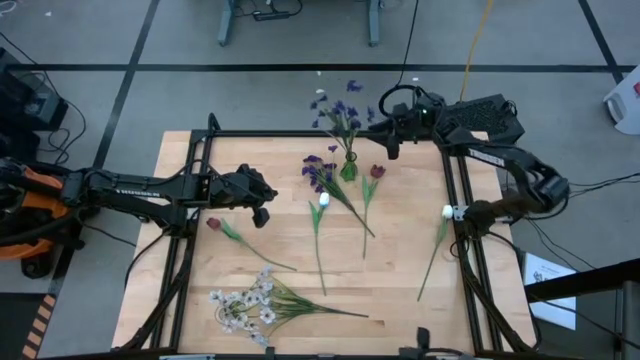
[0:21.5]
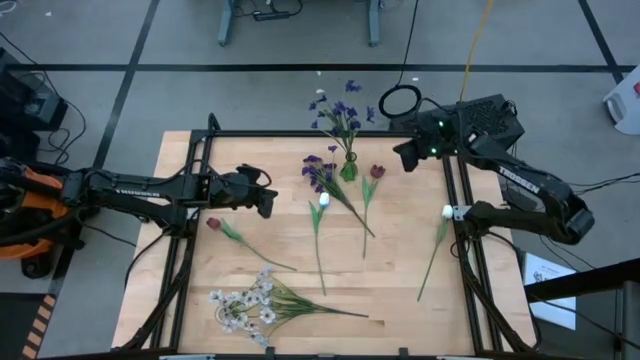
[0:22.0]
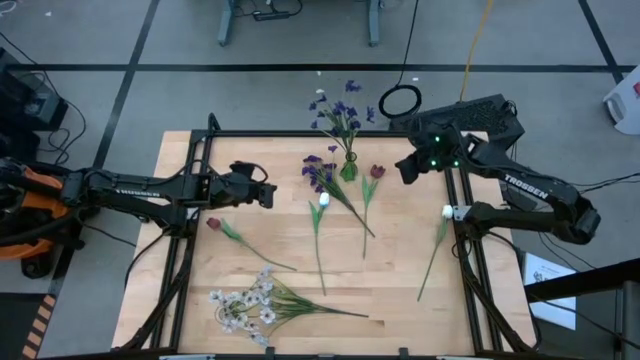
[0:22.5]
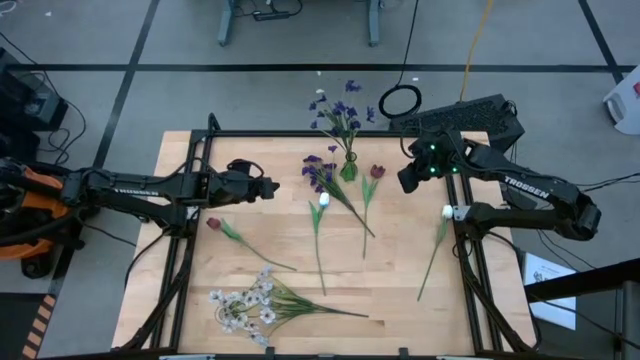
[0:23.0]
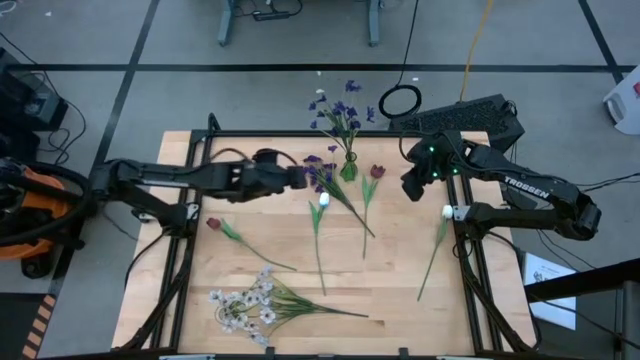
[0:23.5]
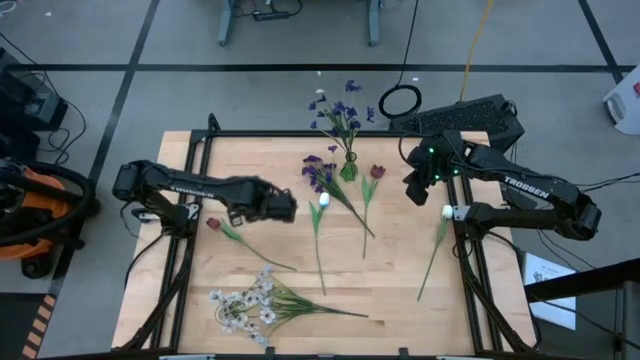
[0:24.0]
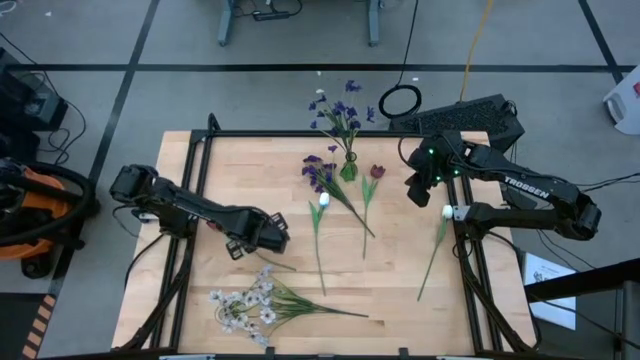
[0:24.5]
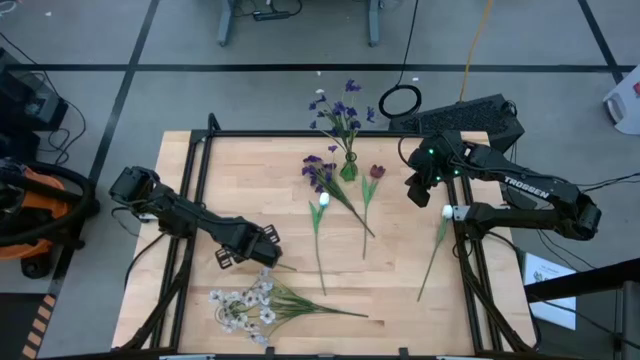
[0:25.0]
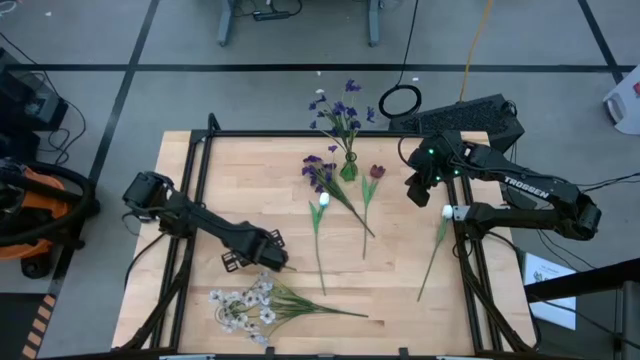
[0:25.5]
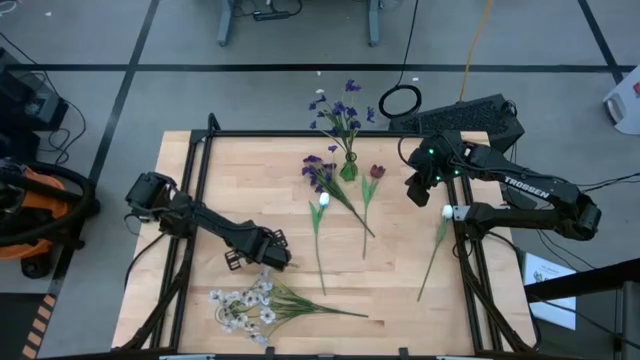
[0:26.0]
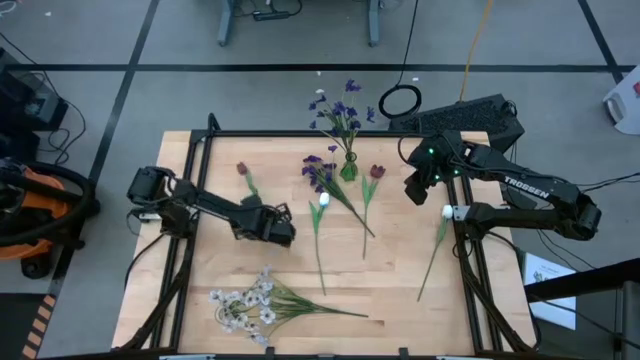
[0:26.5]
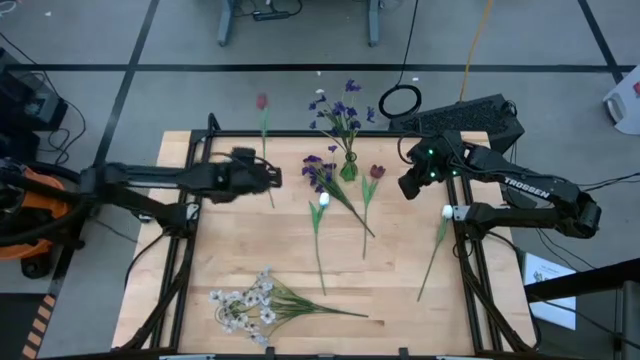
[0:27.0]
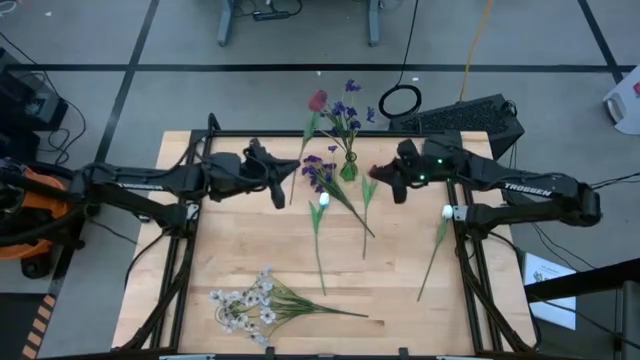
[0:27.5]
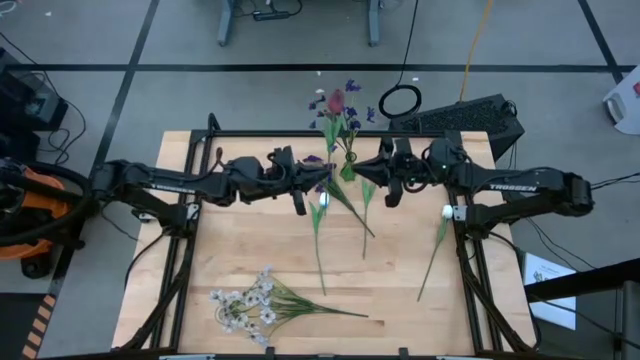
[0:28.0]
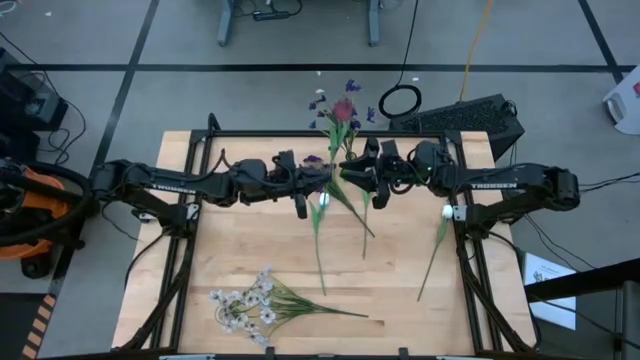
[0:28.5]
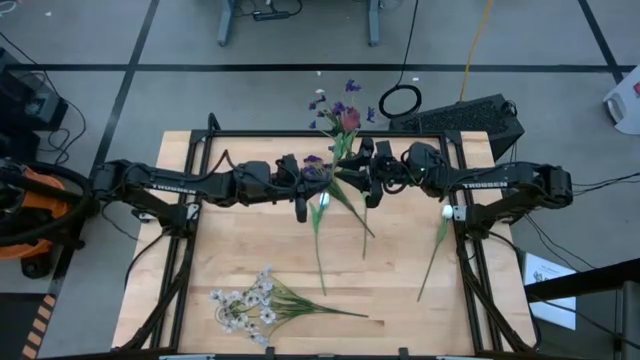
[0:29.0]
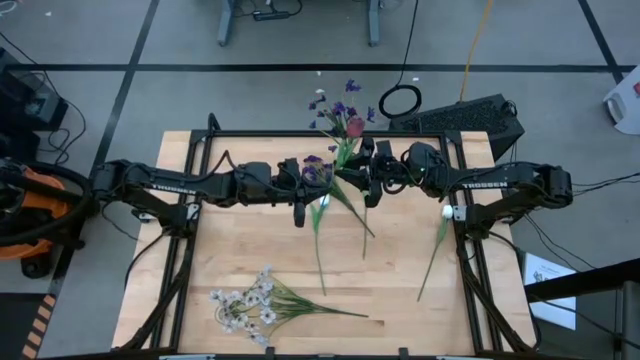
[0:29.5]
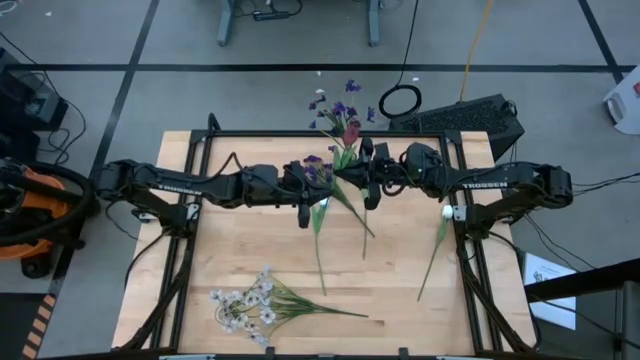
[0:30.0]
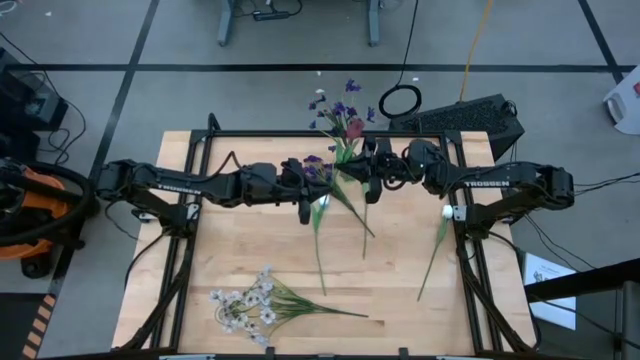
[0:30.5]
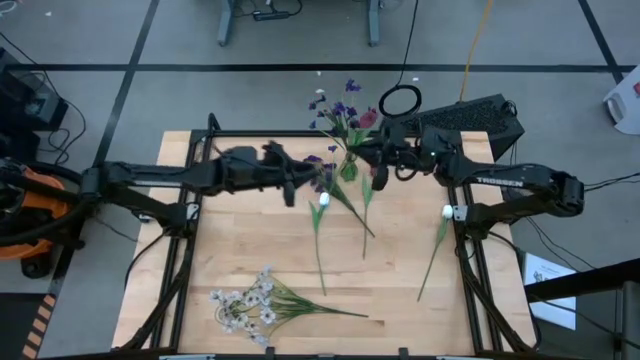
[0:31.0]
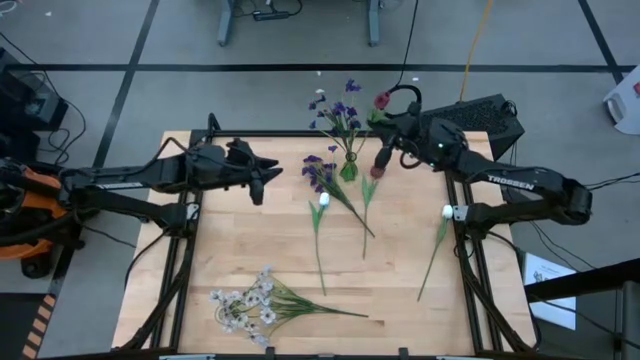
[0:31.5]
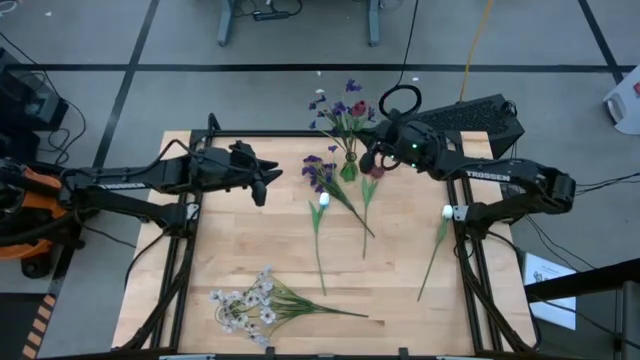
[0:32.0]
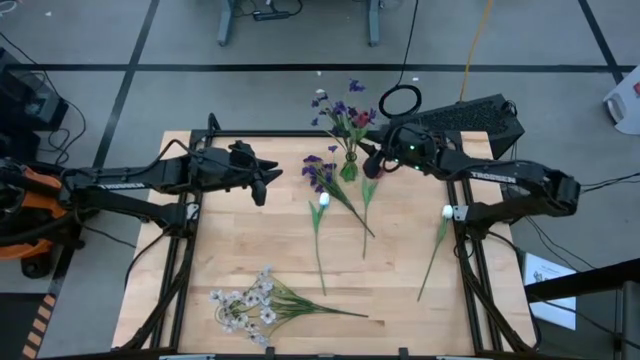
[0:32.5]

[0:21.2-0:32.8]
Task: Sort flowers into vase by color
Put the left red tulip into the green flower vase

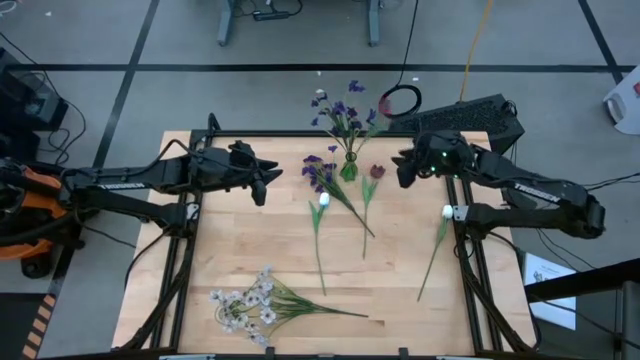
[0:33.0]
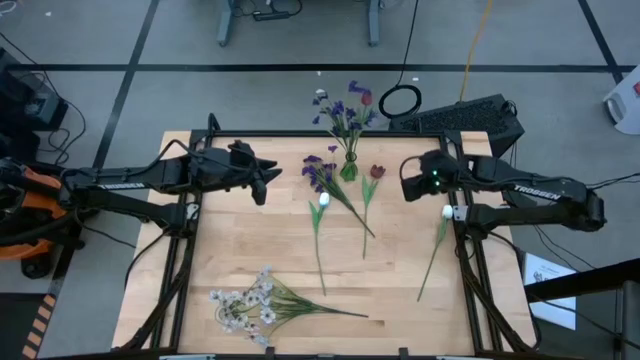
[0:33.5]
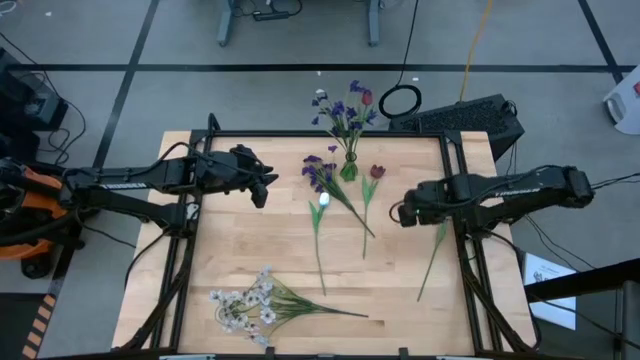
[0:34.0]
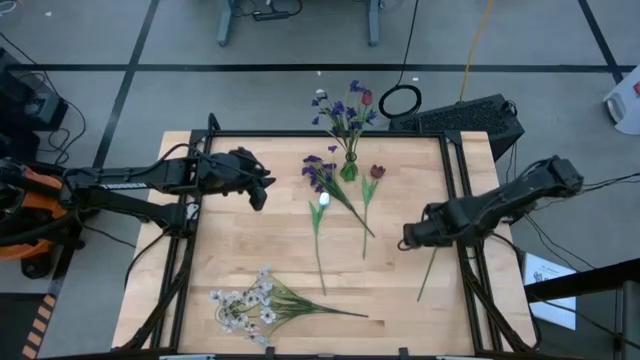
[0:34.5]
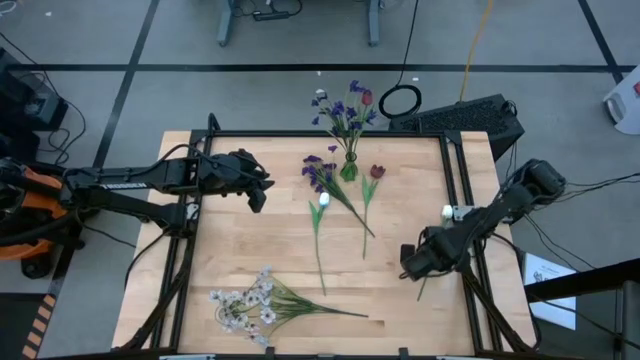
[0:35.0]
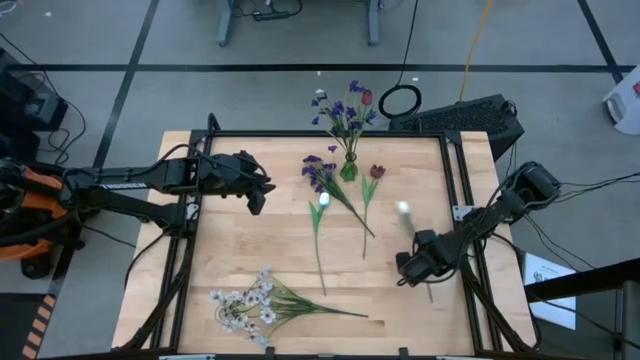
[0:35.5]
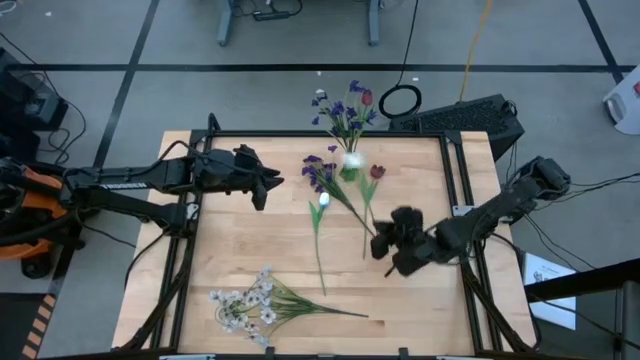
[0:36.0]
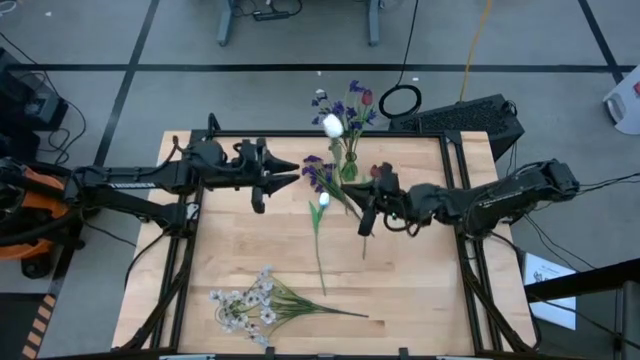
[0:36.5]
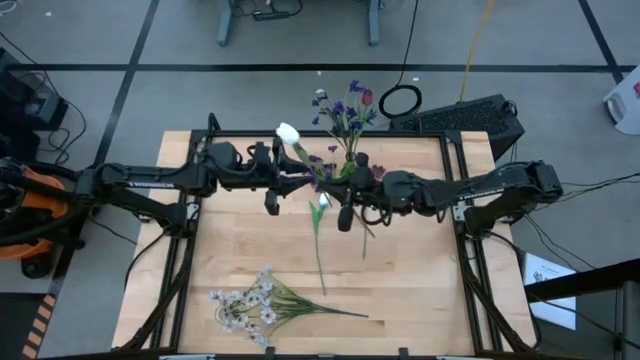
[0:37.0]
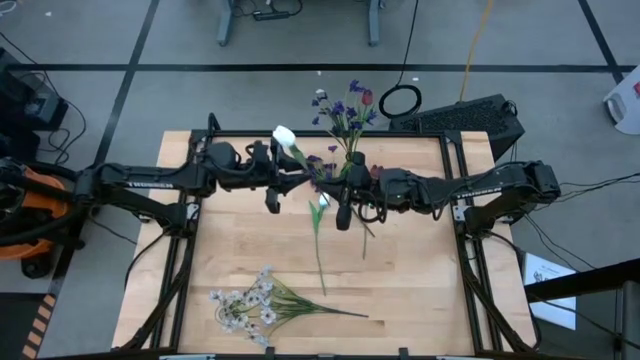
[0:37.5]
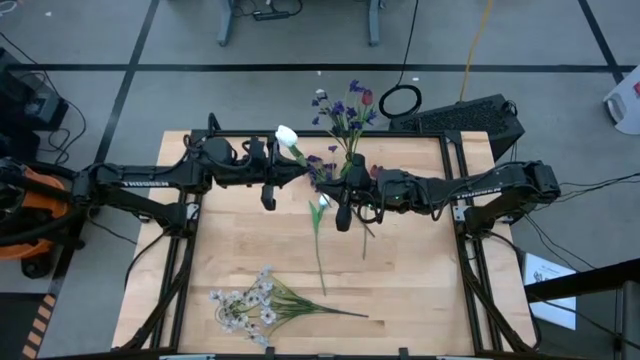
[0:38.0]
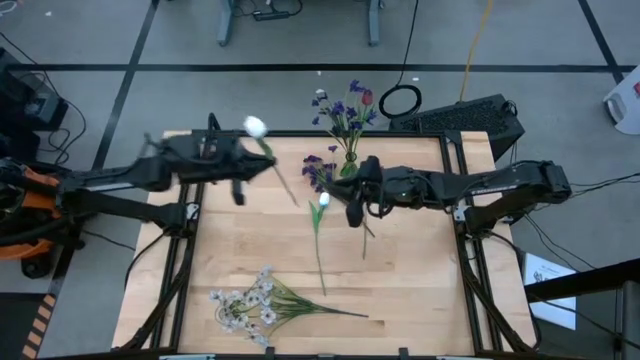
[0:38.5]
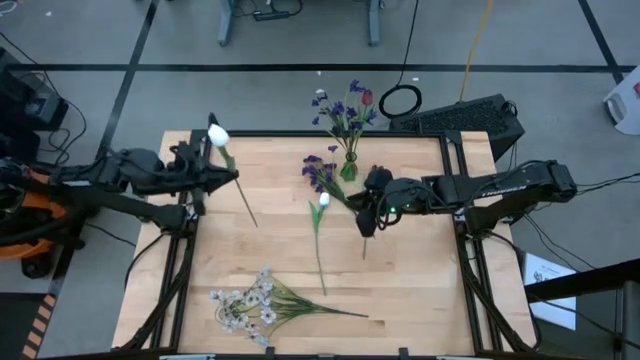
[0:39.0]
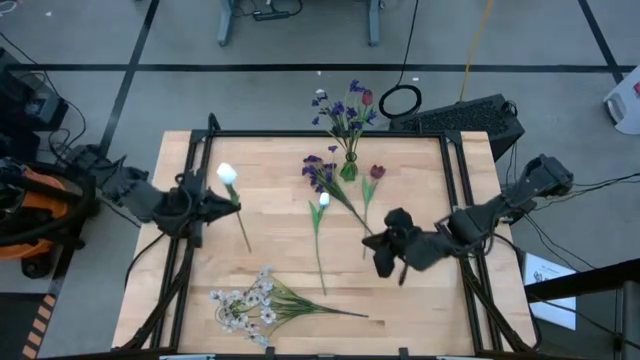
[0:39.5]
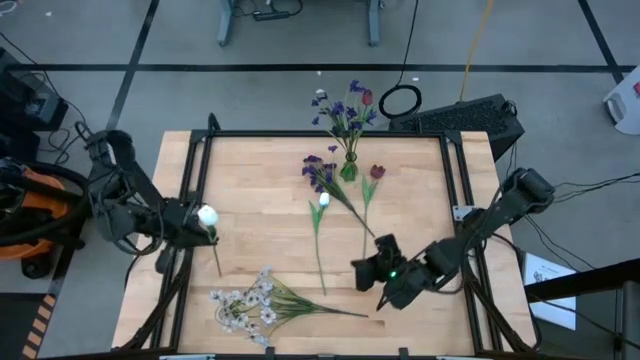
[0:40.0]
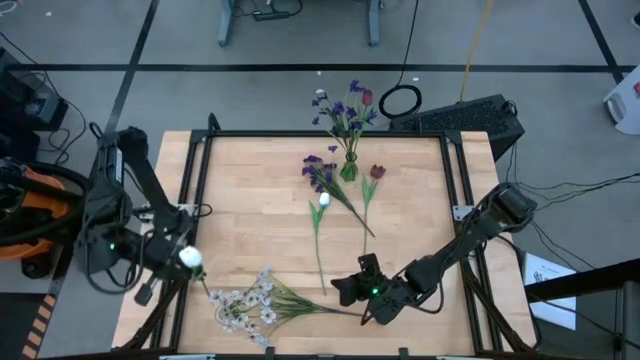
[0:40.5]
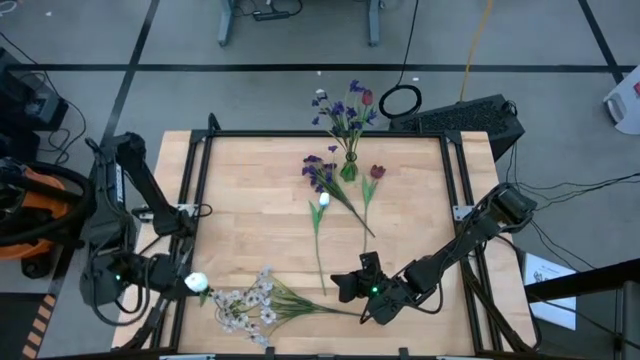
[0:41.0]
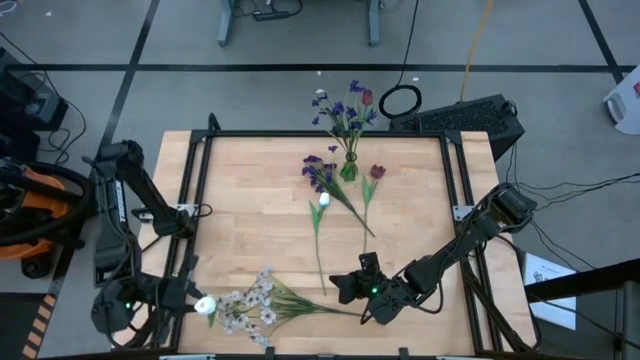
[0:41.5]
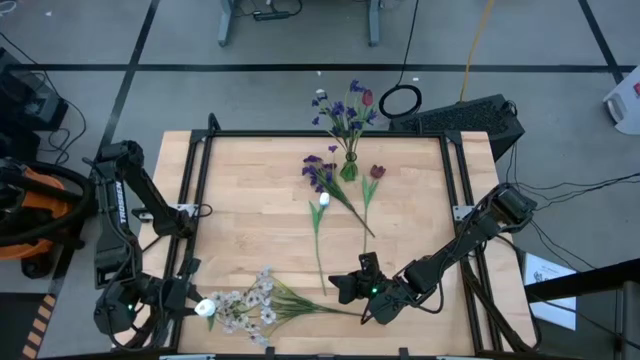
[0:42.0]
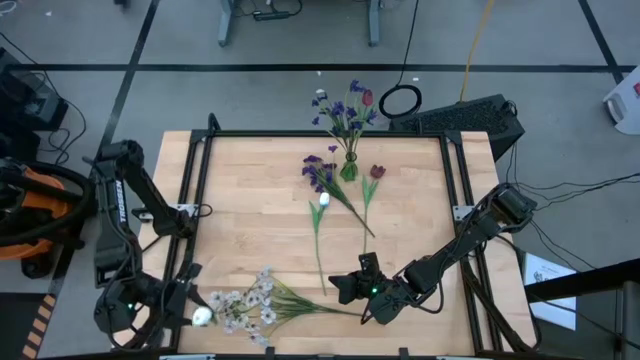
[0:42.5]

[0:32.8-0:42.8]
Put the right white tulip into the transparent flower vase
